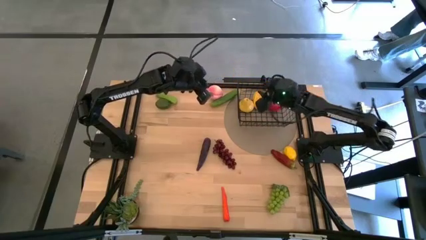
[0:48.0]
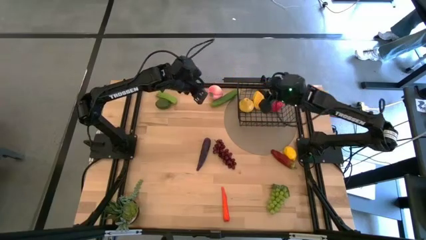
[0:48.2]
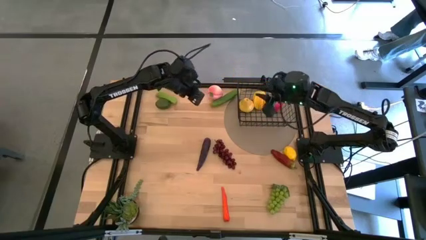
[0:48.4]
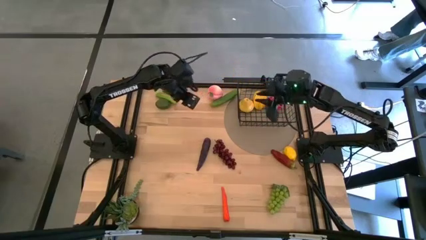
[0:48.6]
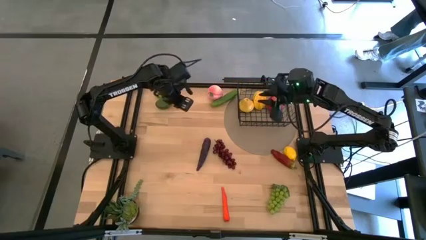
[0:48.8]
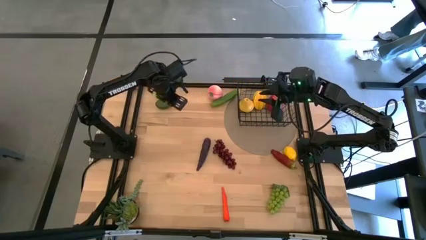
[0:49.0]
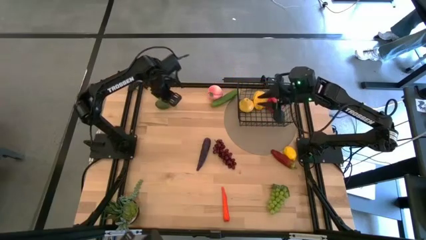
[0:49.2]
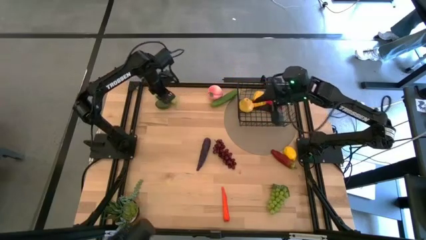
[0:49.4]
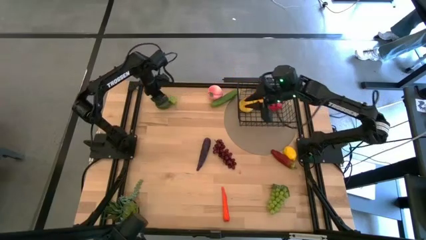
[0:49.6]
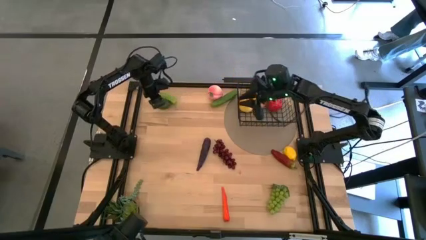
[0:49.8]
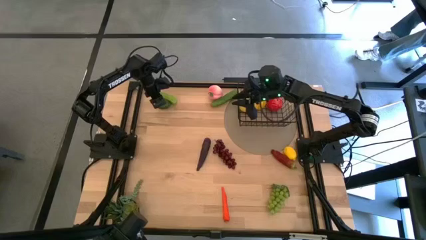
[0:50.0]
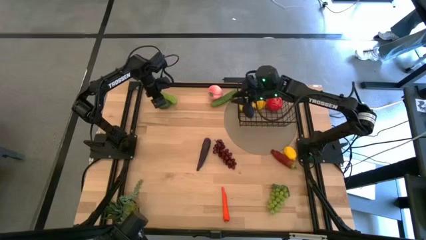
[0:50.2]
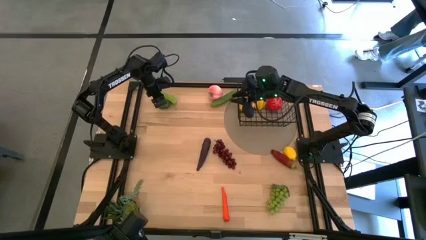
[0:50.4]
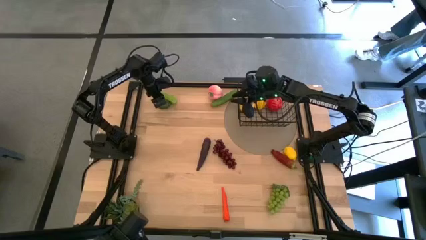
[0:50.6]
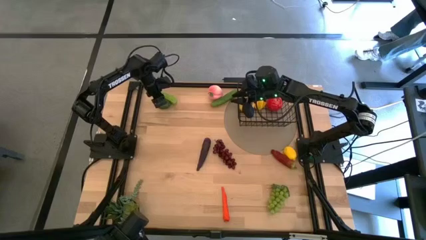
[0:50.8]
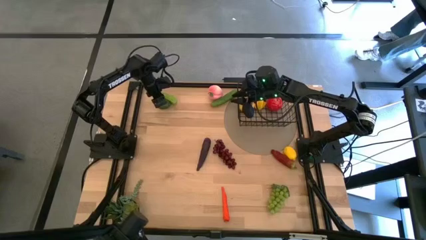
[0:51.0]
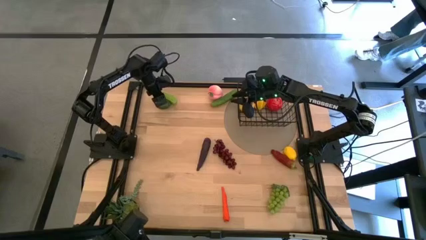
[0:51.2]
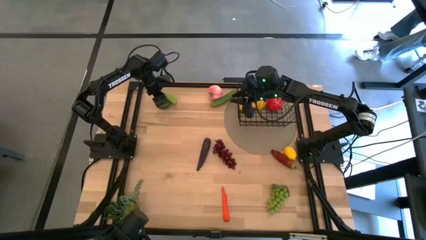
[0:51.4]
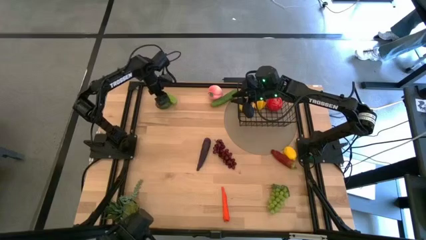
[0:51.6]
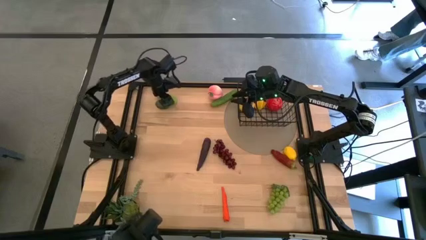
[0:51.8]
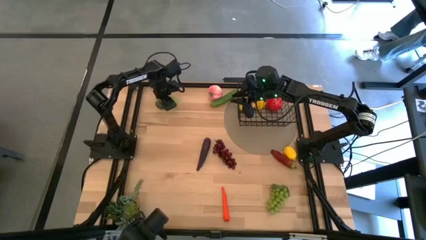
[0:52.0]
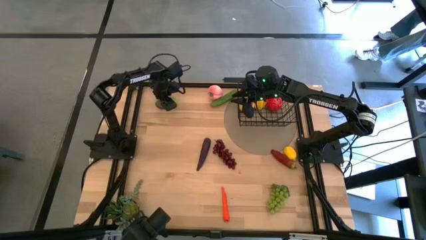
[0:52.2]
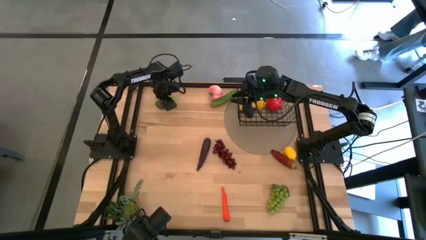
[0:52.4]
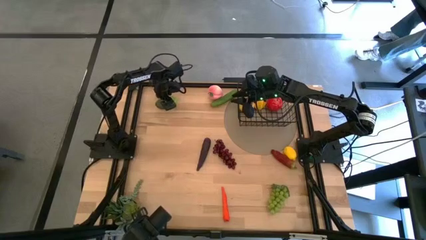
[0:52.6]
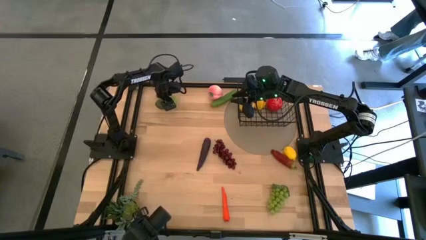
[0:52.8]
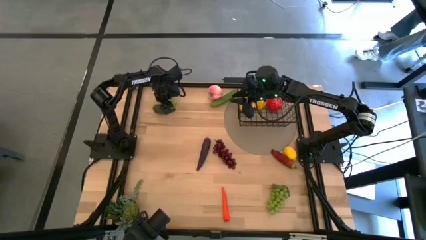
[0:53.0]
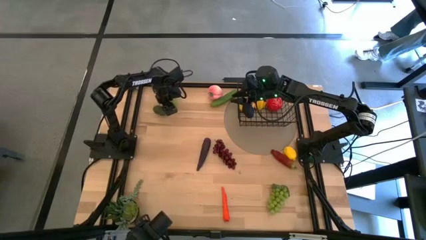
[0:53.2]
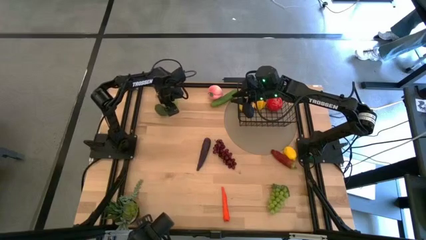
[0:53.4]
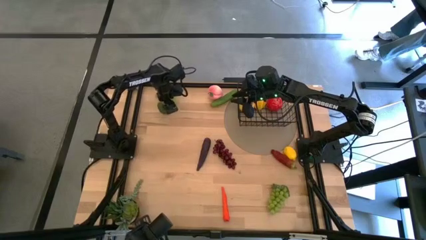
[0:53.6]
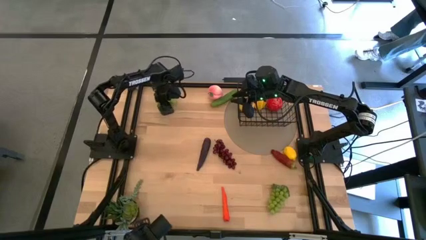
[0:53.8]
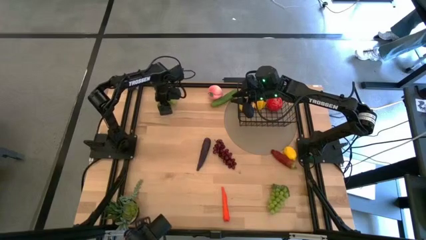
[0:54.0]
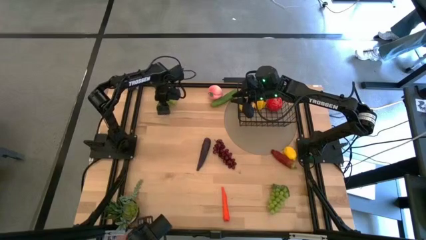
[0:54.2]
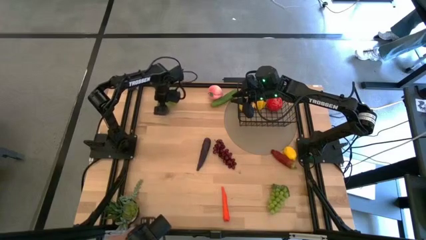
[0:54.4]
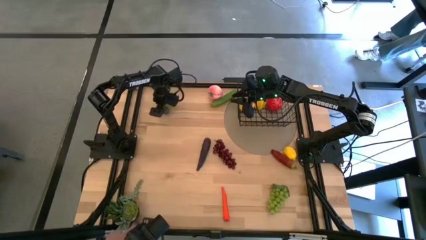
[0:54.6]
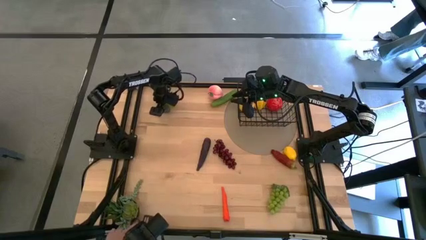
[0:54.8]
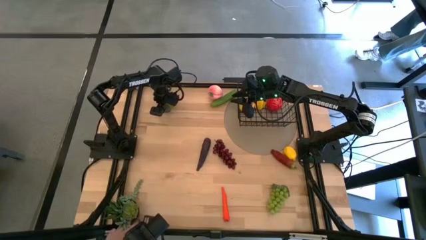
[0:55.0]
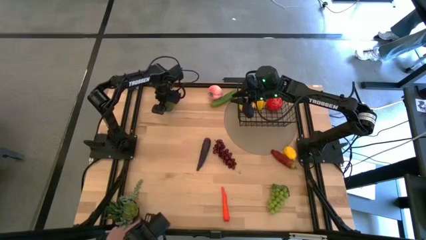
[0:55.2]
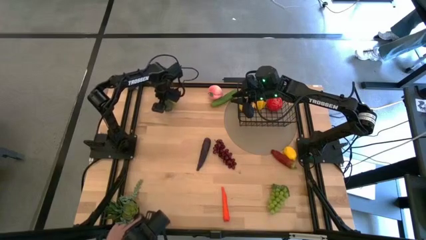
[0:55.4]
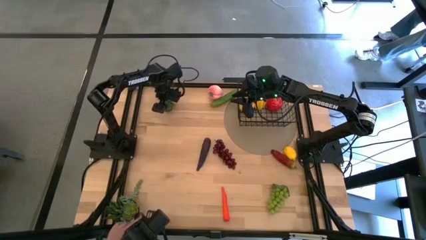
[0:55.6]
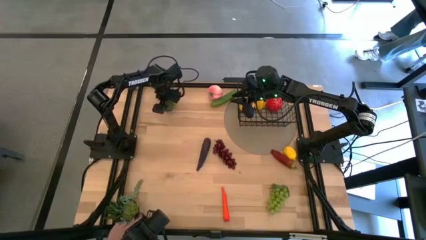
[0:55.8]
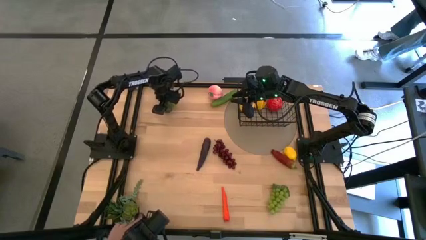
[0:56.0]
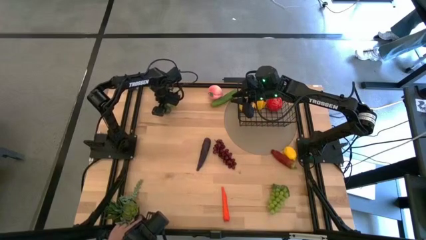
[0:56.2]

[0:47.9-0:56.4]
Task: Build produce basket
Put the green lime into the black wire basket

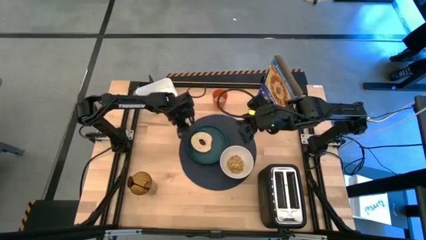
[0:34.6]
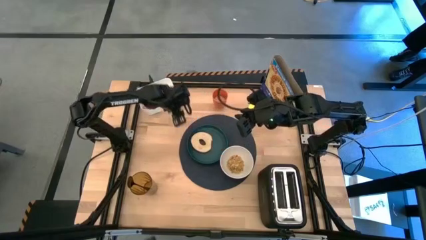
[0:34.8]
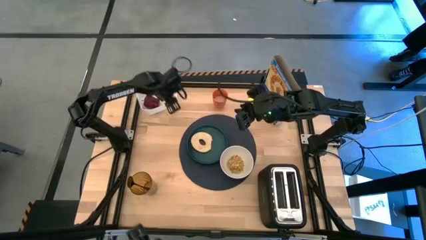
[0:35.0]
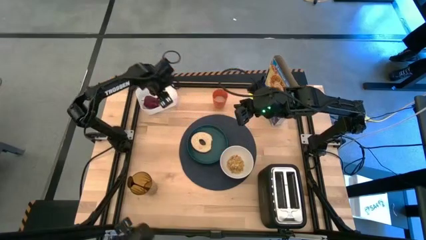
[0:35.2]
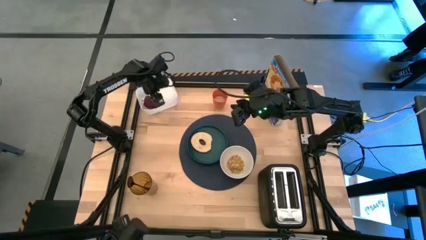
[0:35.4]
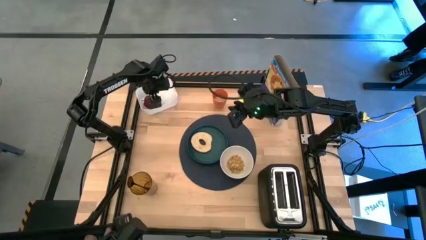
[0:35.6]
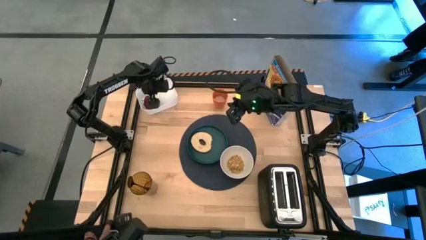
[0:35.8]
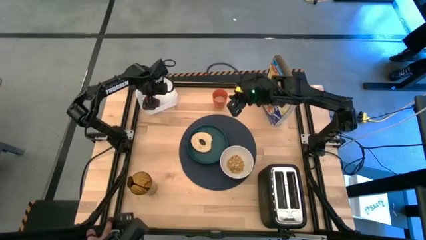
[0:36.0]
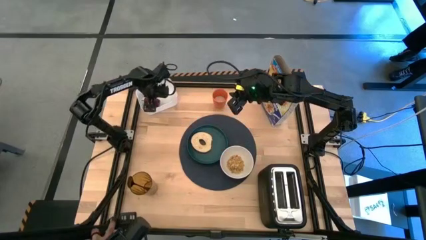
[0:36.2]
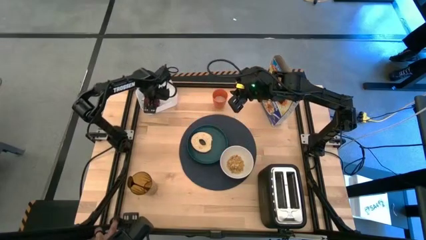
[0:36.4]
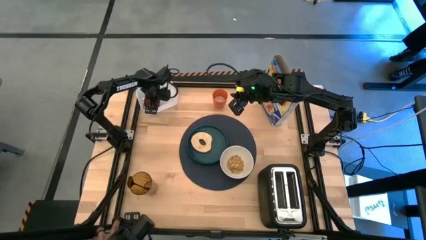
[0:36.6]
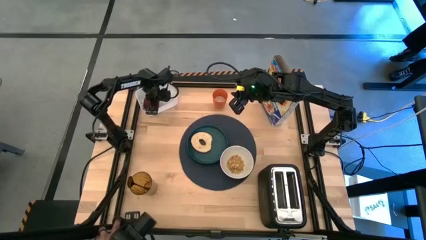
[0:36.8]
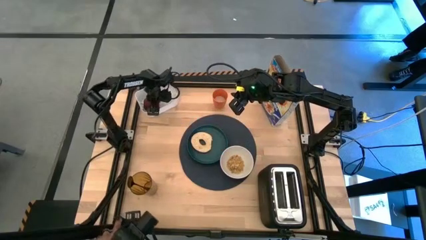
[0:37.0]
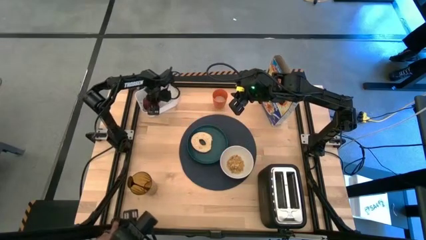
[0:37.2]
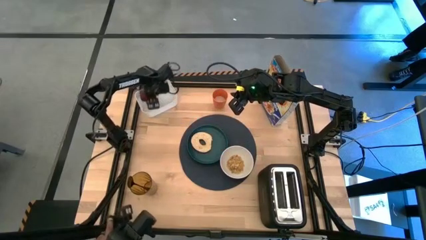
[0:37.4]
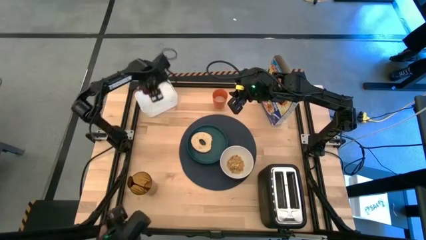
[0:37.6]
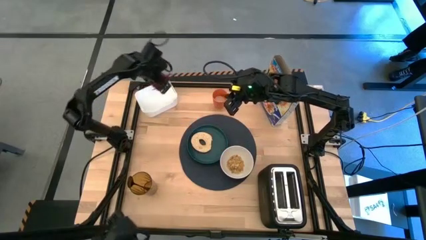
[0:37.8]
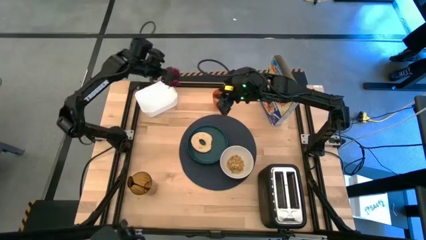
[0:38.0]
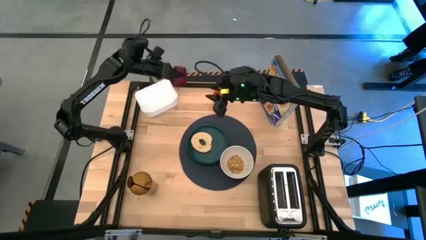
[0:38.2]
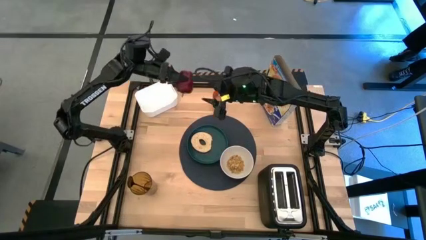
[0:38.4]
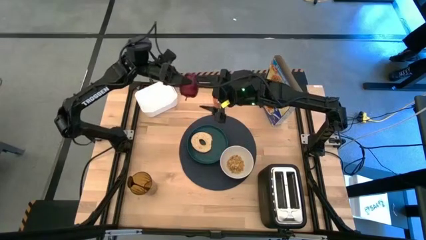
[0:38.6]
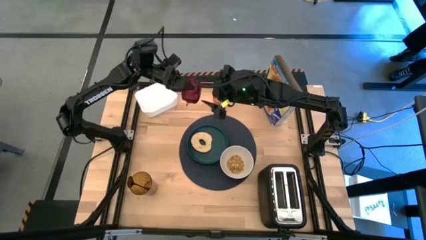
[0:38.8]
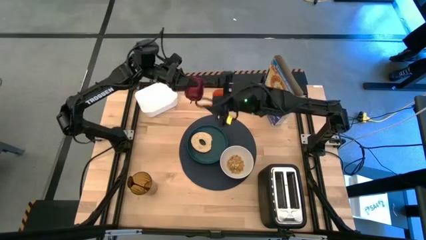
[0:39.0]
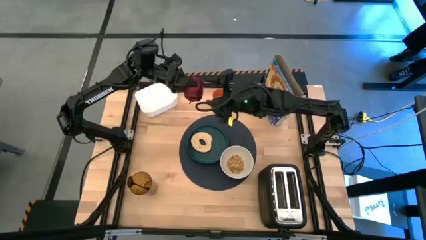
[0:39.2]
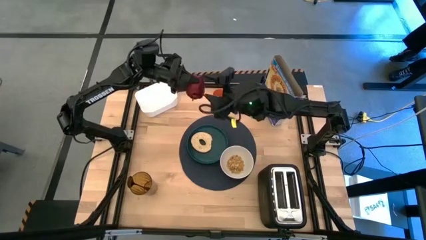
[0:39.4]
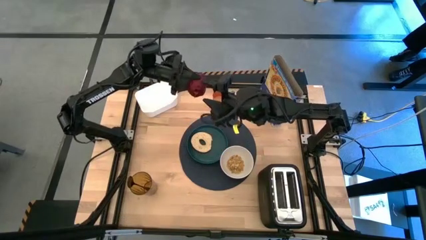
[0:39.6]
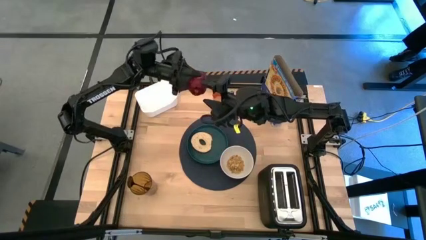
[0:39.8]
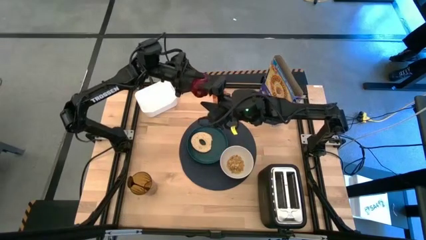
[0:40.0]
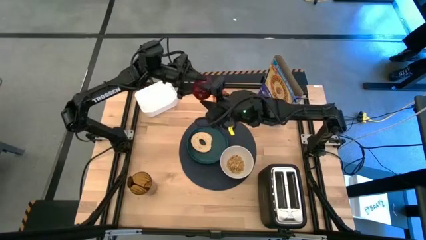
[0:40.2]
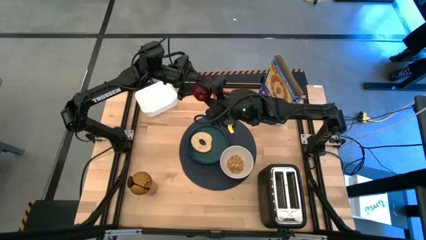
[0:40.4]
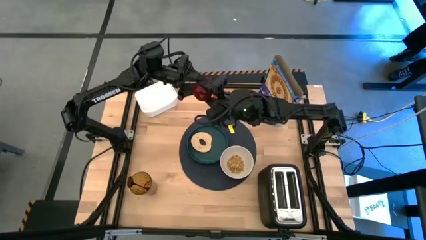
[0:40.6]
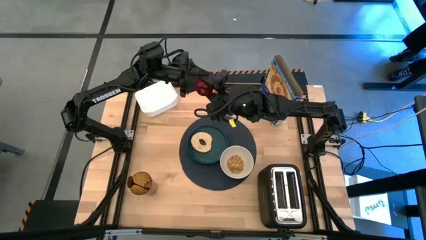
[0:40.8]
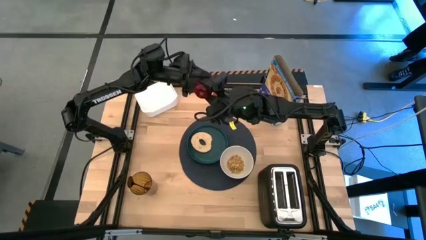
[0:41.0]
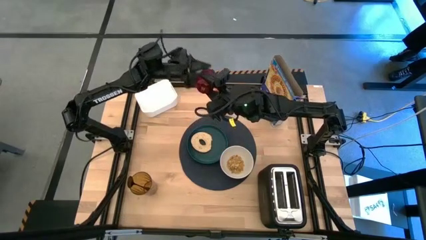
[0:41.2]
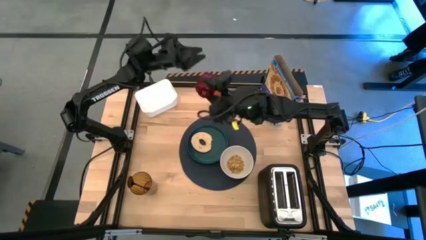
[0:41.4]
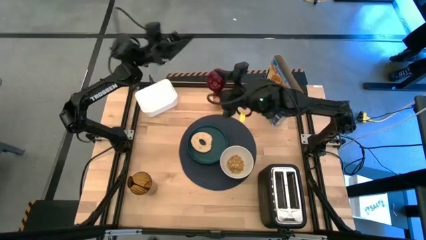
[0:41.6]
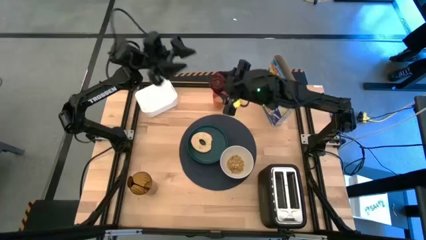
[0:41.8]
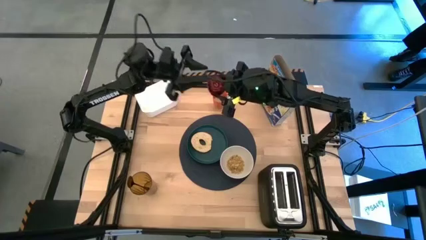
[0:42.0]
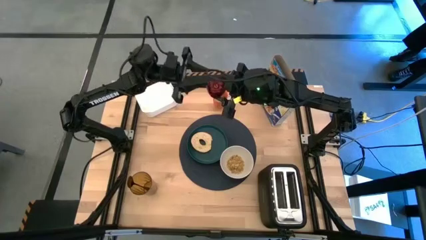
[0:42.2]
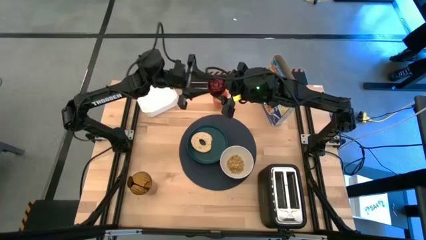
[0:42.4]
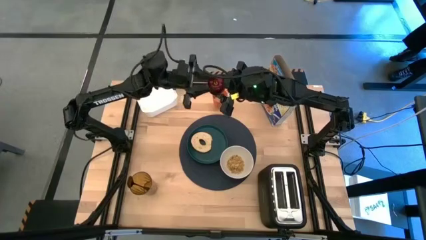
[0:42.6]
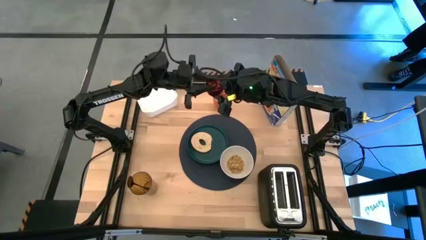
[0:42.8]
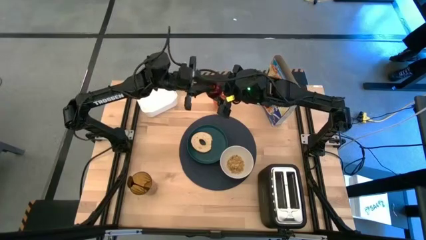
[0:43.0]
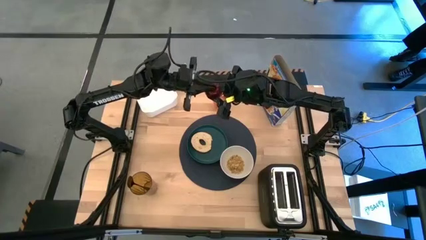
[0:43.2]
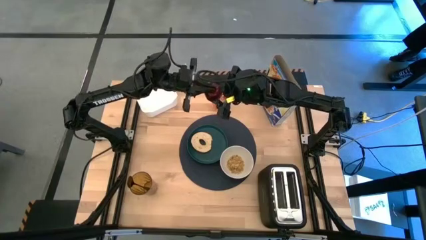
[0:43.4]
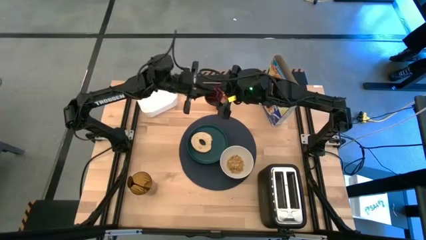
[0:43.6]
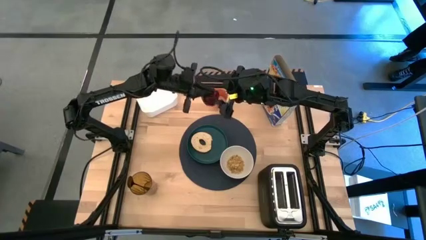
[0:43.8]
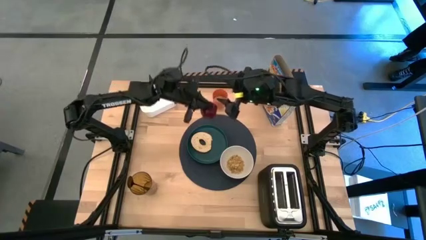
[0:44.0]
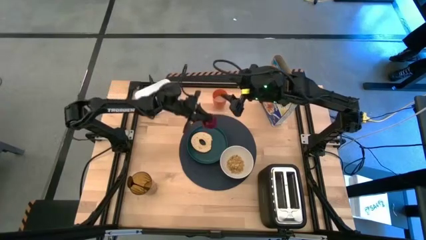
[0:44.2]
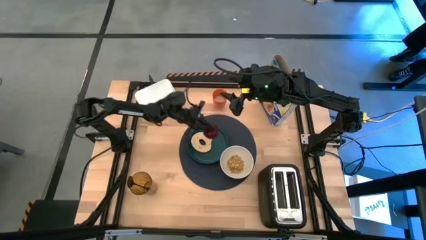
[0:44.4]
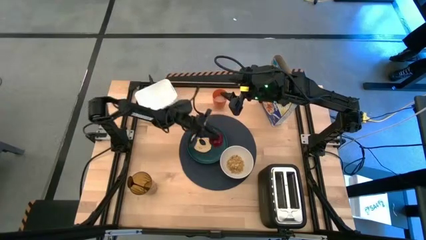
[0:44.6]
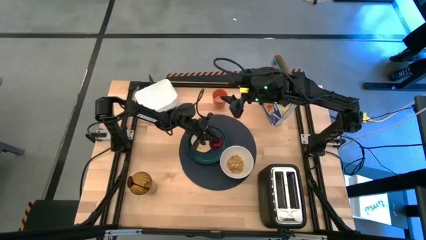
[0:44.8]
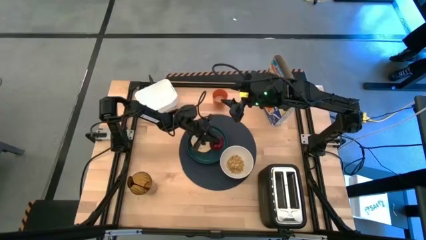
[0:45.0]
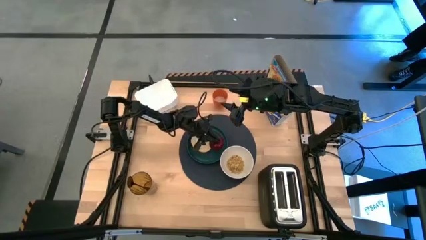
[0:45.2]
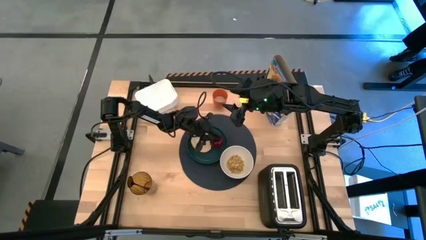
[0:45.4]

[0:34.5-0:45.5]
Task: Arrange a breakfast setting
Put the apple into the green plate
